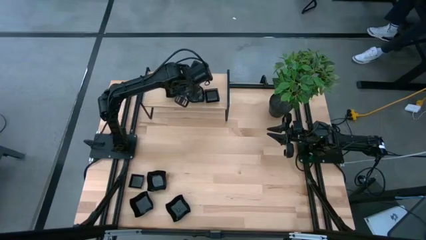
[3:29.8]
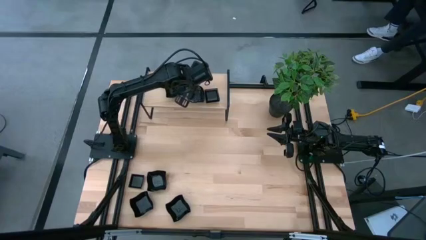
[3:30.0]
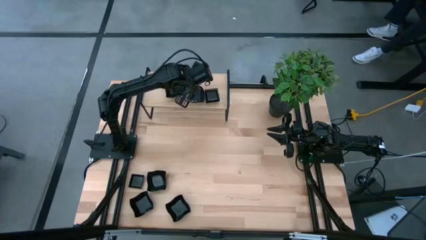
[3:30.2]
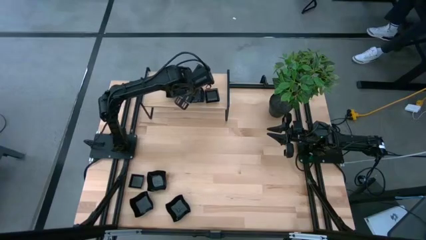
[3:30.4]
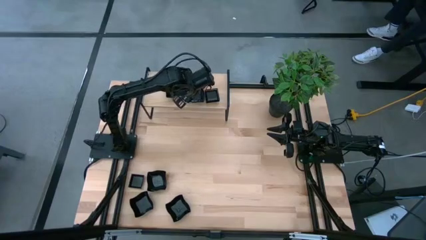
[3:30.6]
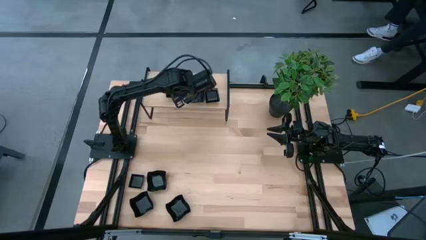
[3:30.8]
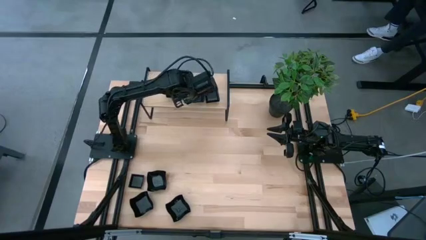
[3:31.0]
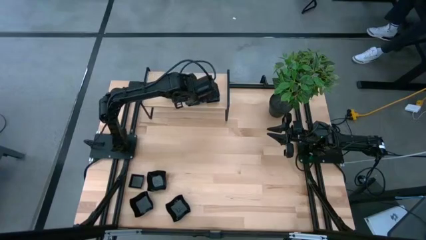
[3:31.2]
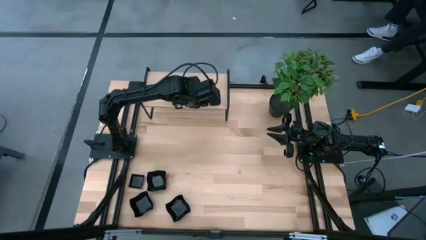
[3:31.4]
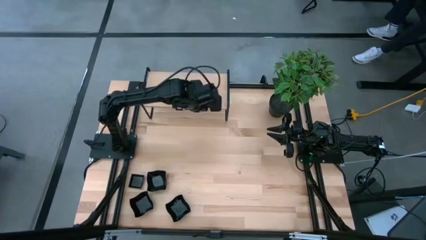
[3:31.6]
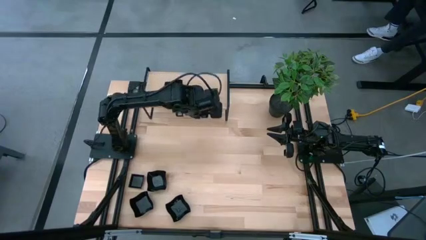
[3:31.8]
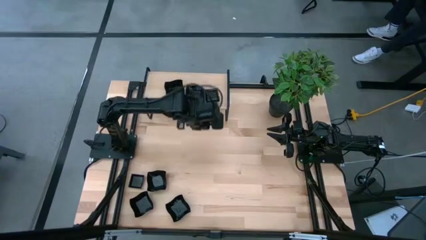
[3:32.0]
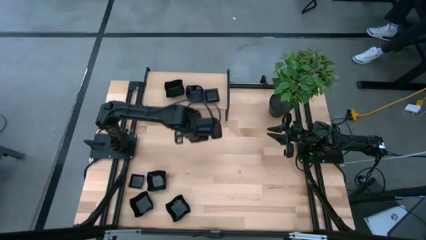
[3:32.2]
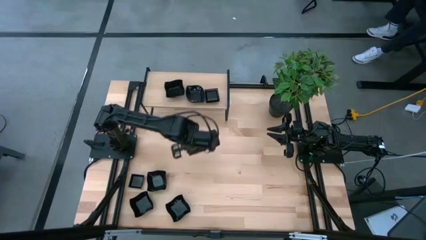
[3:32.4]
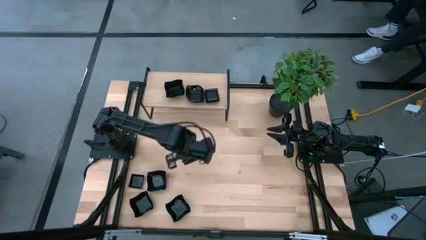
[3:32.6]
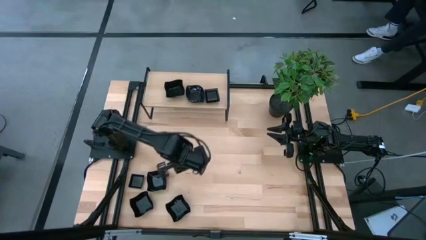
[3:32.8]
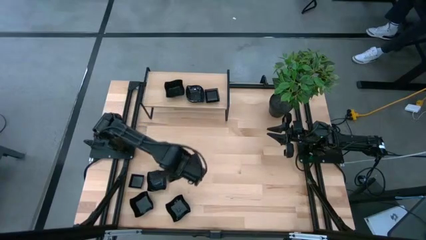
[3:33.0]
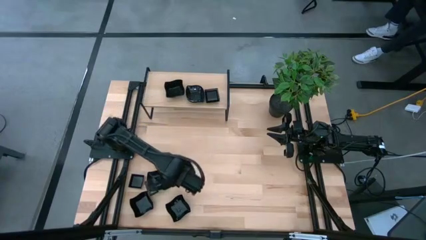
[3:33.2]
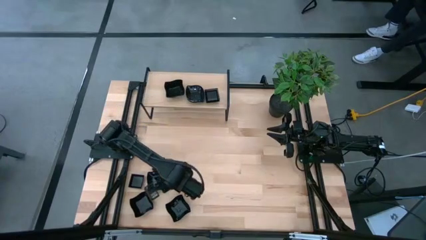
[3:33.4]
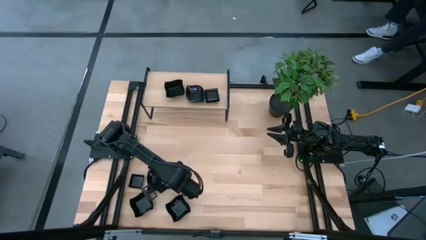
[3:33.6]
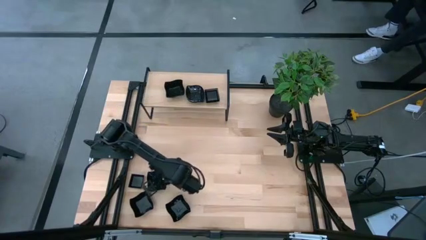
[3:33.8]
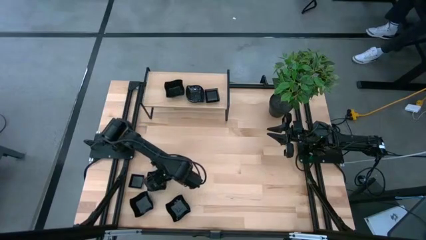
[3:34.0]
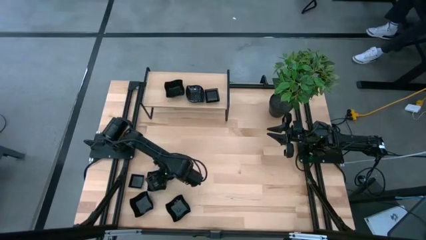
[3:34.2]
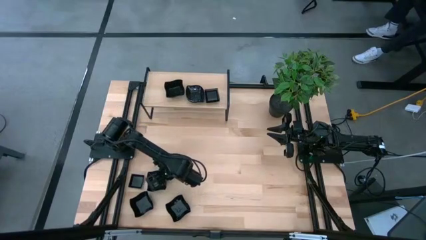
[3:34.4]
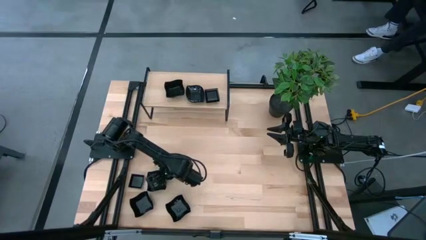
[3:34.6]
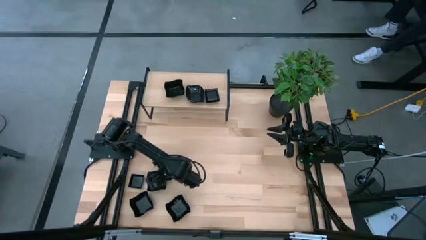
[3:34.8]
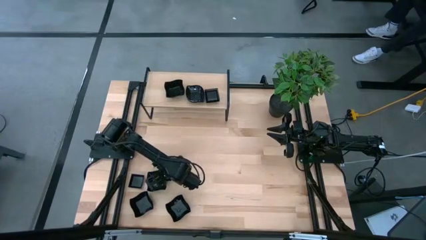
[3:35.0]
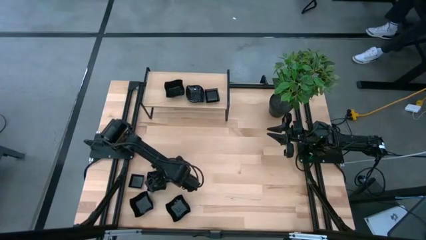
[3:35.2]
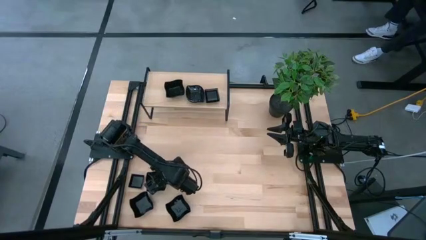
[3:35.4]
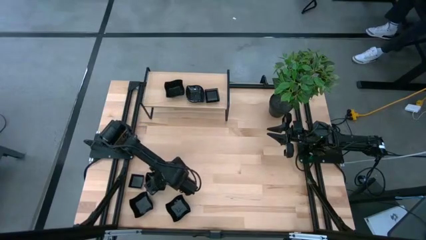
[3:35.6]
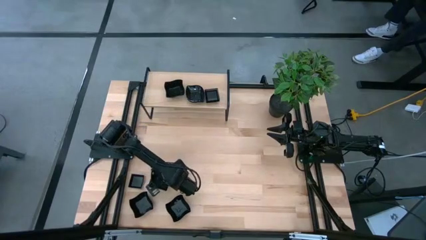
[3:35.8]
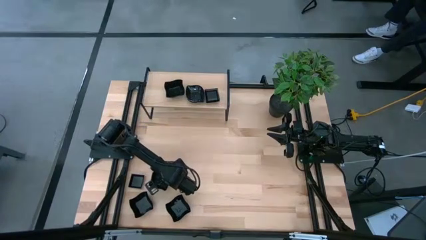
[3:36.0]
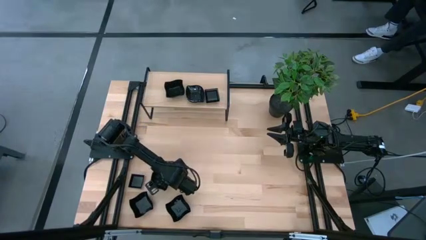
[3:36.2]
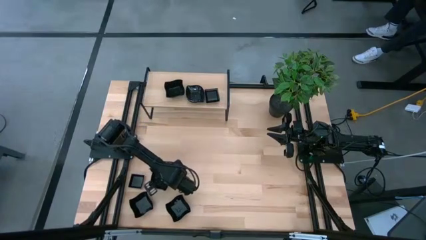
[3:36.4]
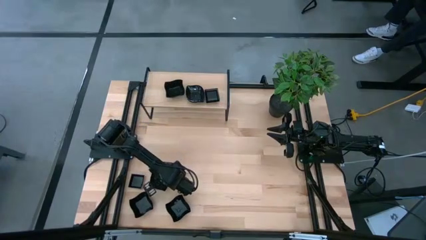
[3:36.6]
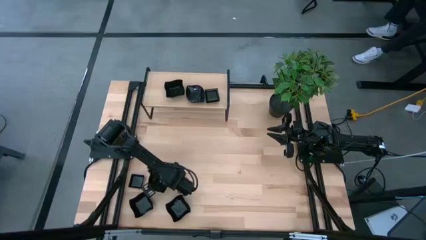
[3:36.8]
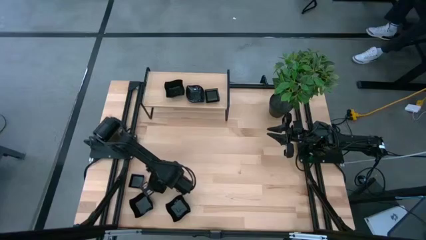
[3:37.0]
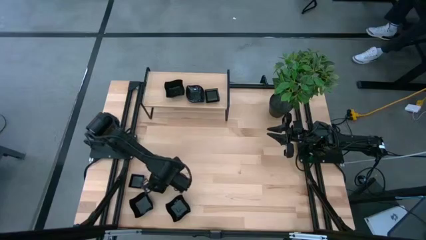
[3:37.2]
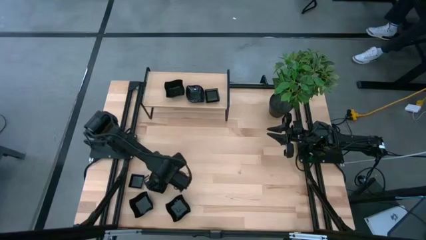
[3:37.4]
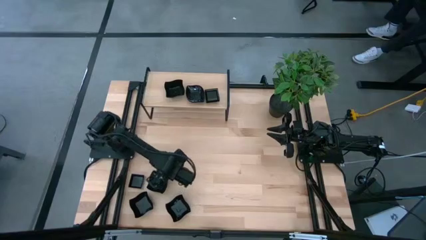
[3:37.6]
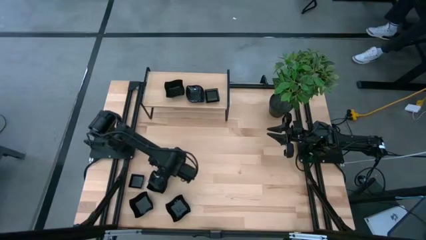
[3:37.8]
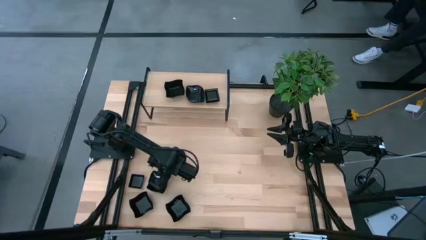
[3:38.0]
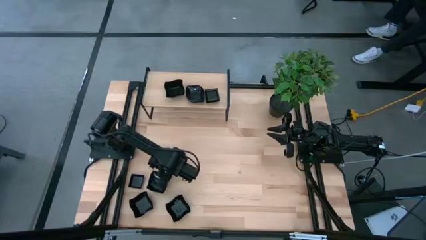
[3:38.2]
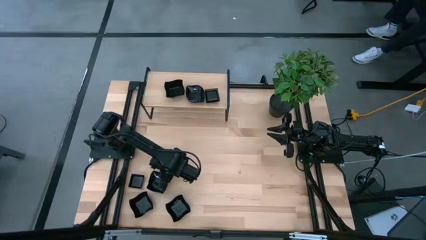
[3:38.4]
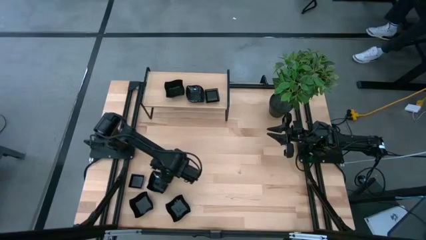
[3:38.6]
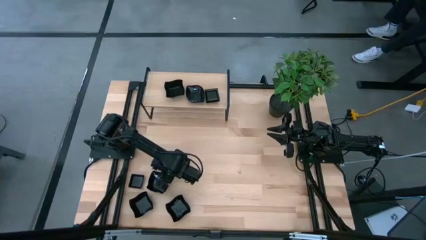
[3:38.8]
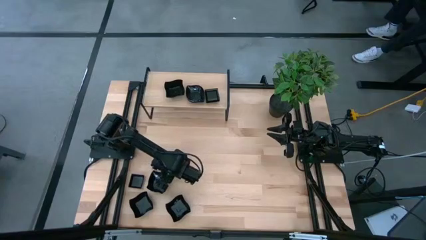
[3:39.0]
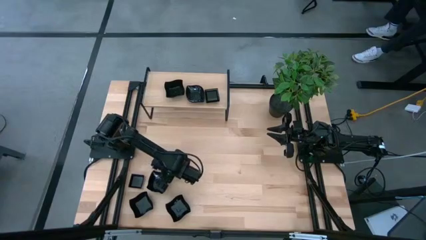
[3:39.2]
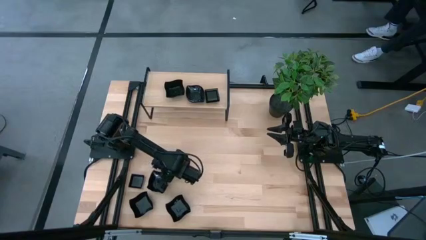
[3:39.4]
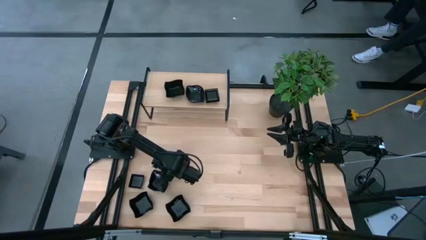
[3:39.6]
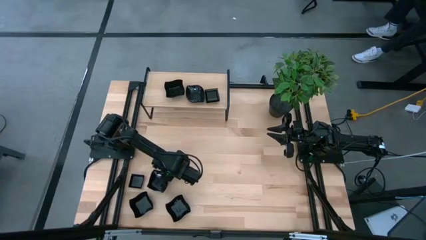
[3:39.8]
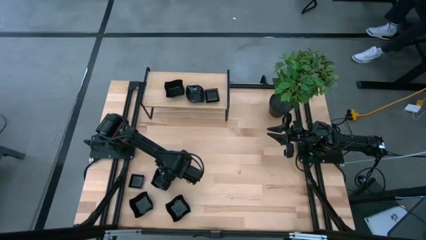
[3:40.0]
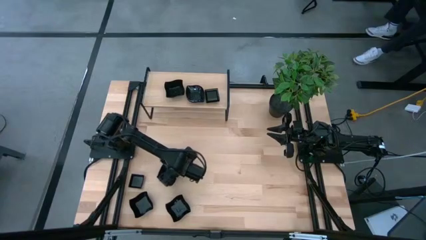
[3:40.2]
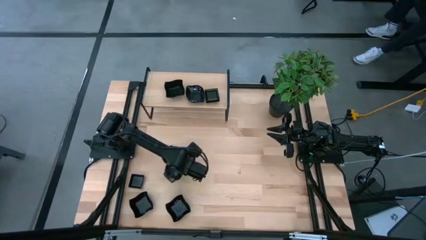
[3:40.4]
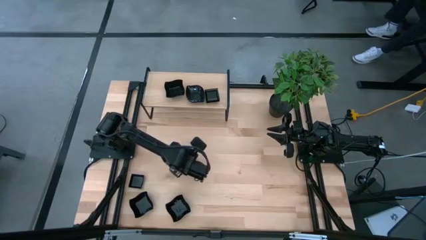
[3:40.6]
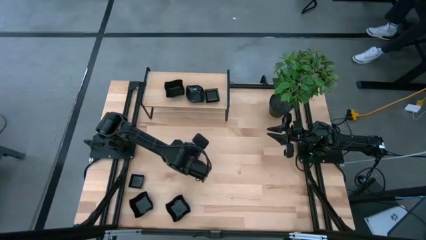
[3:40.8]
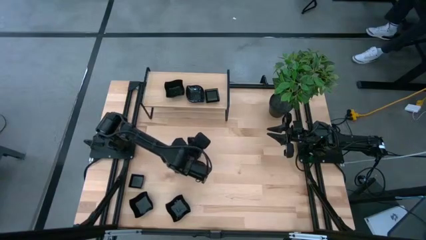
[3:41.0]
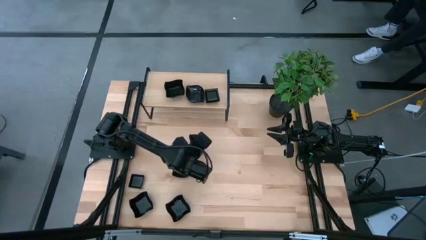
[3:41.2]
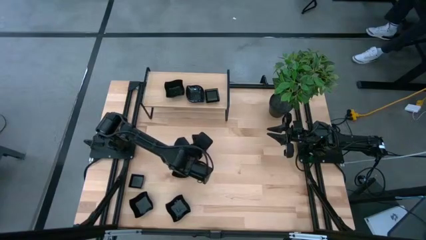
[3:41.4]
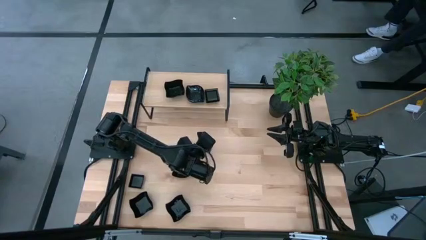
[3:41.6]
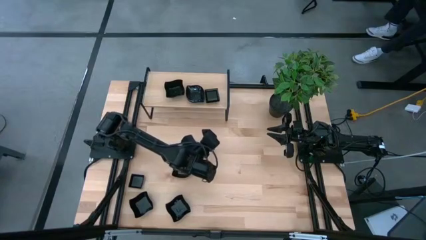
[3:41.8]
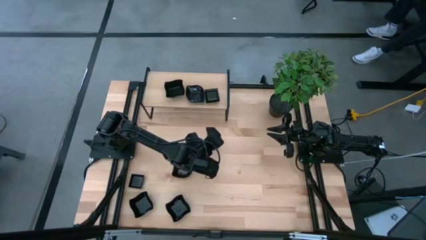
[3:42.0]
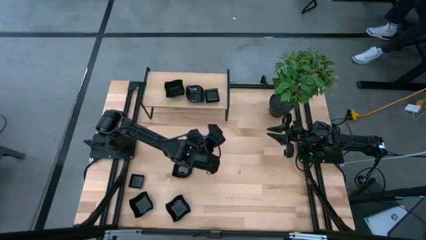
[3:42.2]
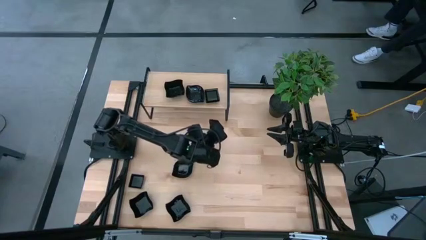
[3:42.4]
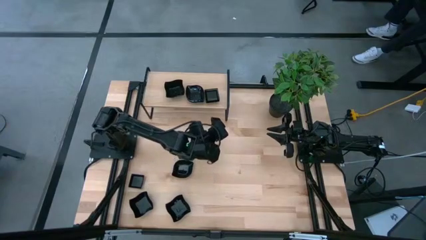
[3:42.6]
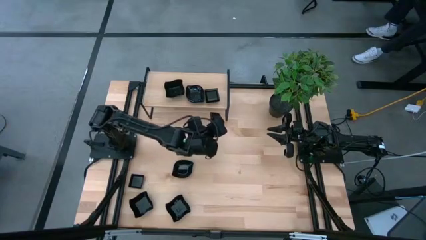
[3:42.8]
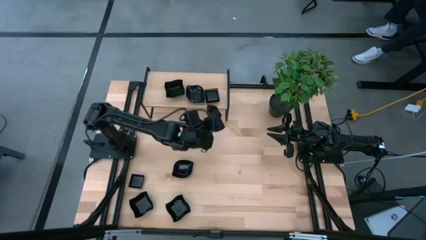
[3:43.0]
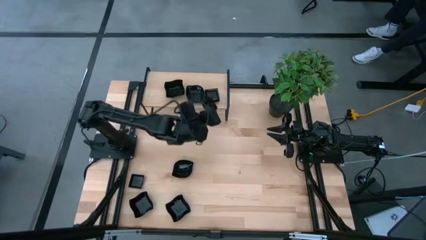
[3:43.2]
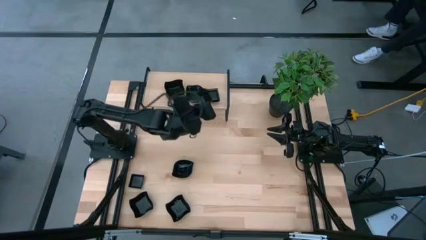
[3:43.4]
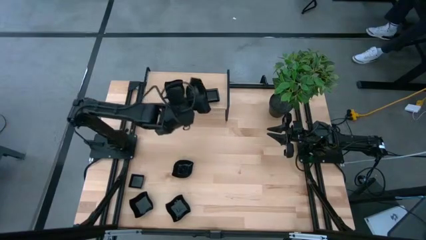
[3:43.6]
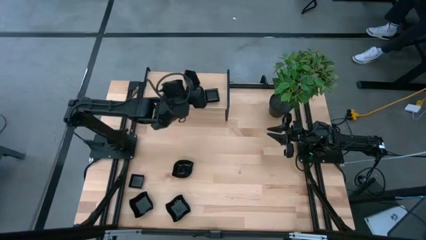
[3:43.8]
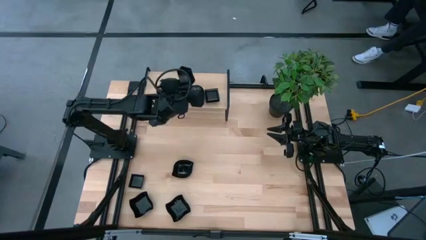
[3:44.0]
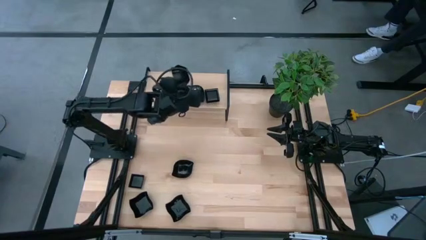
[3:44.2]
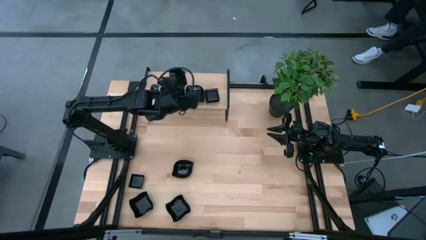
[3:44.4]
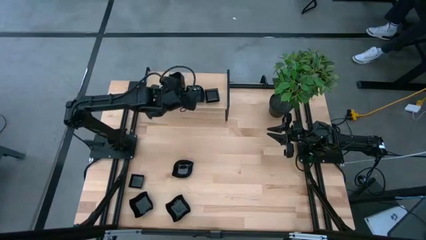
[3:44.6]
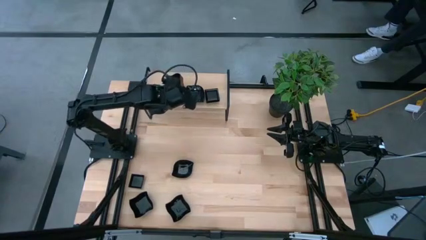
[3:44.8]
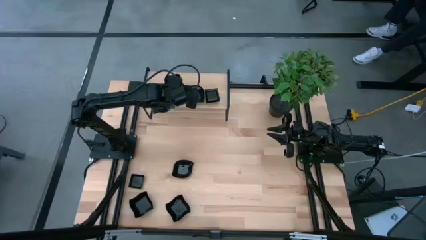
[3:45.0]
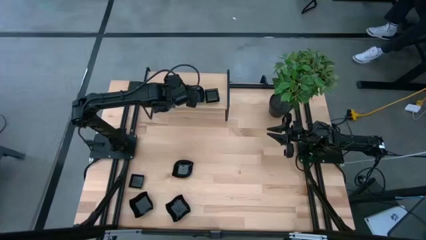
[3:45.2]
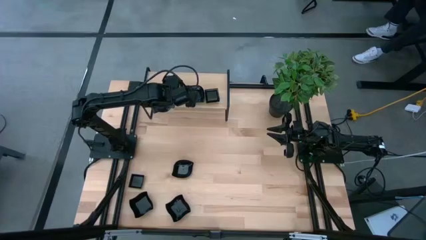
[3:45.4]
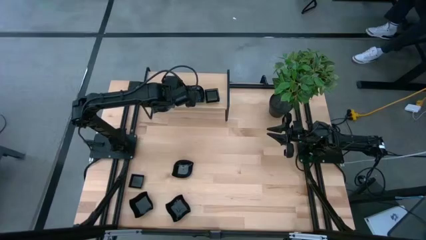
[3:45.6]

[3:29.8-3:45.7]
Task: Pick & Place Mini shaped plates
Stack the distorted square plate on top of the distorted square plates on the shelf

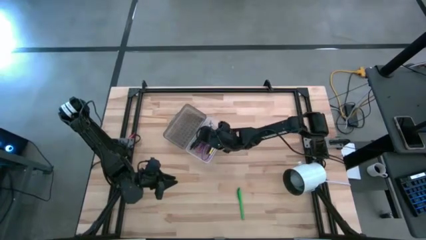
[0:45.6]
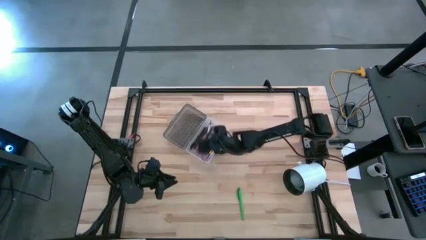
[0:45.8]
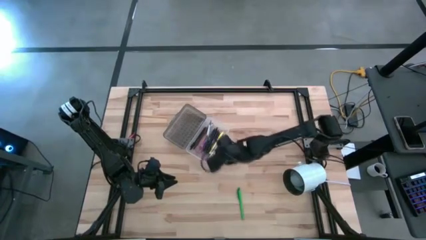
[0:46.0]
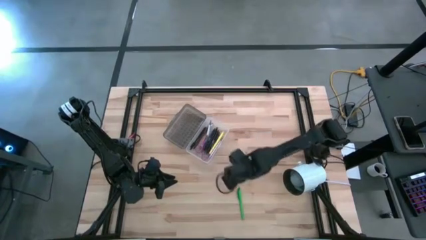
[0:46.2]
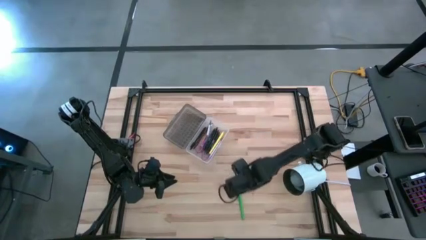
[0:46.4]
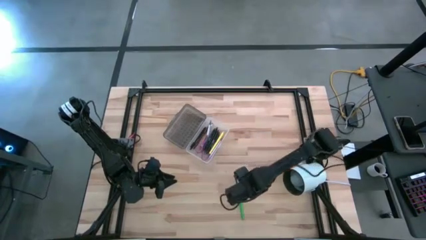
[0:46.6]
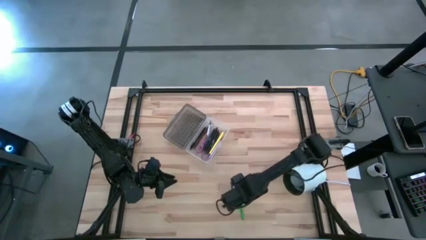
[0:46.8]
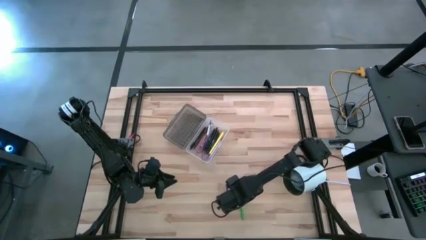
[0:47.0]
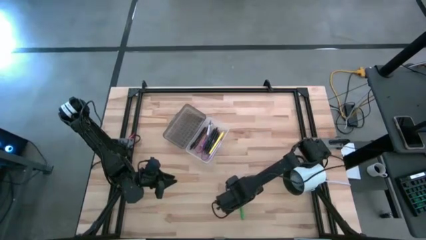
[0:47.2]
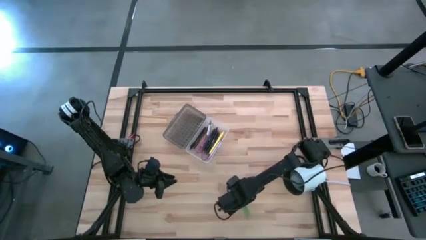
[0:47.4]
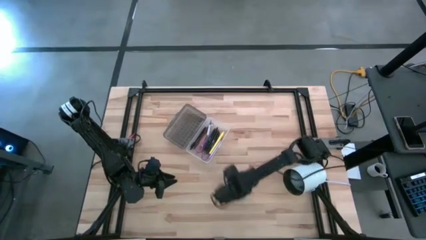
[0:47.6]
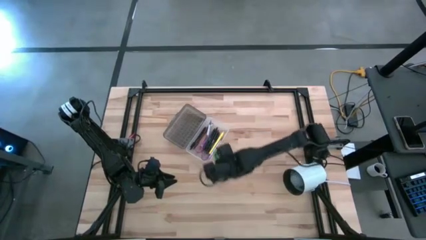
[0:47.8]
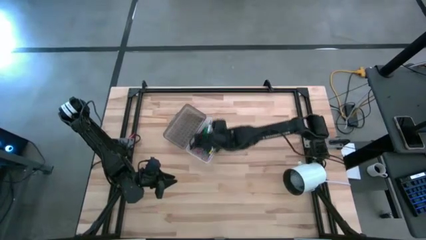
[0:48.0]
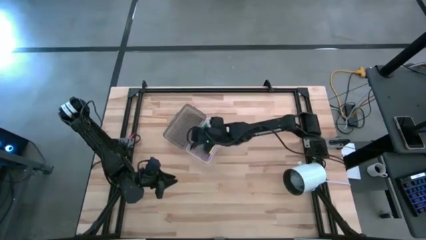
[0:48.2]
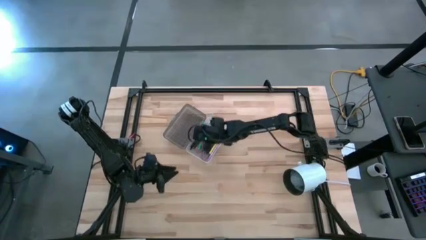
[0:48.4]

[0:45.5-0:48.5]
Task: Pick & place school supplies into a supply box
Put the green pen into the black supply box
